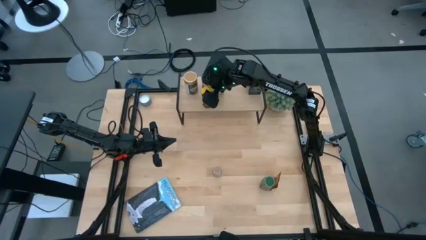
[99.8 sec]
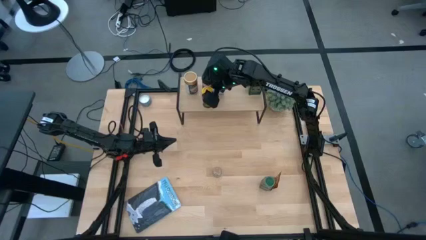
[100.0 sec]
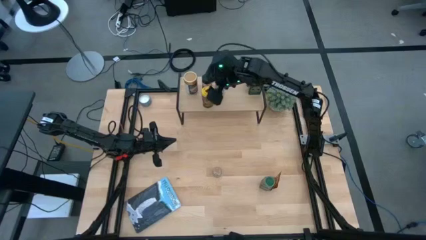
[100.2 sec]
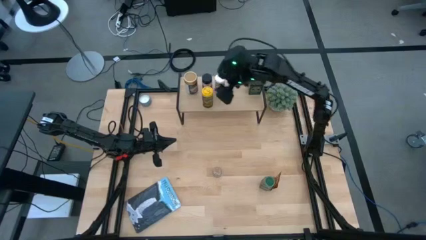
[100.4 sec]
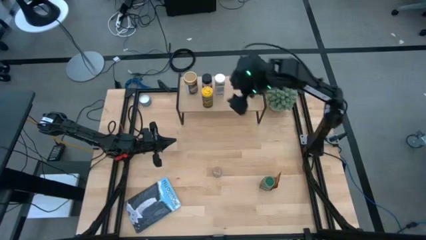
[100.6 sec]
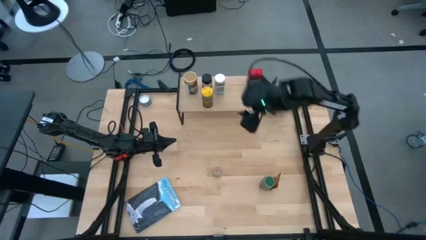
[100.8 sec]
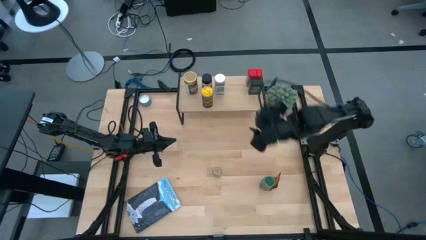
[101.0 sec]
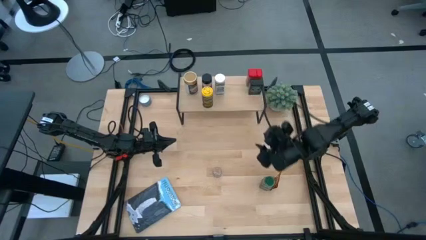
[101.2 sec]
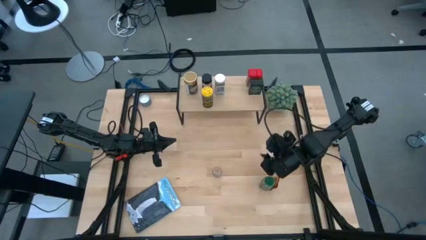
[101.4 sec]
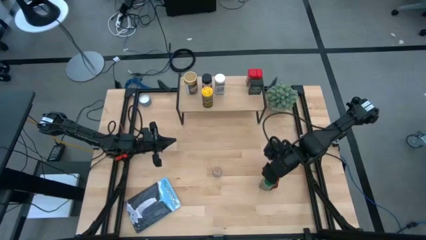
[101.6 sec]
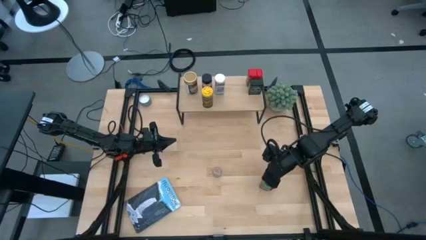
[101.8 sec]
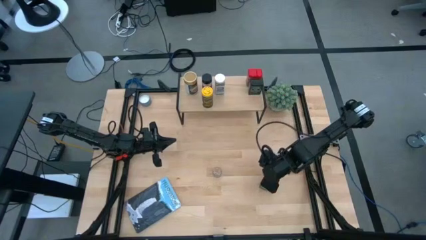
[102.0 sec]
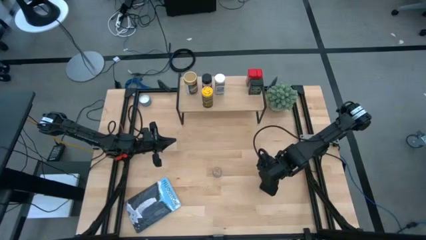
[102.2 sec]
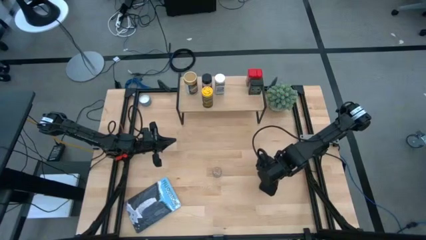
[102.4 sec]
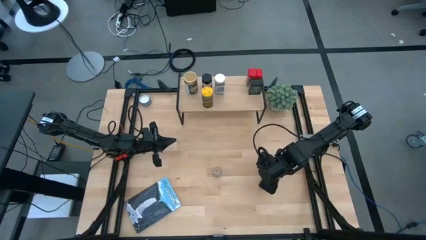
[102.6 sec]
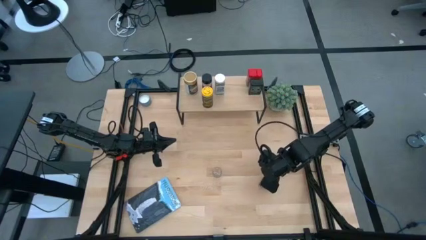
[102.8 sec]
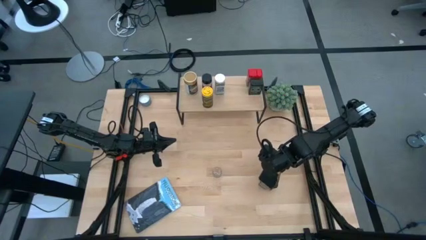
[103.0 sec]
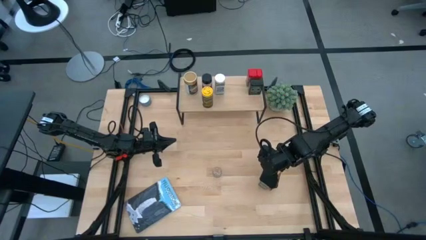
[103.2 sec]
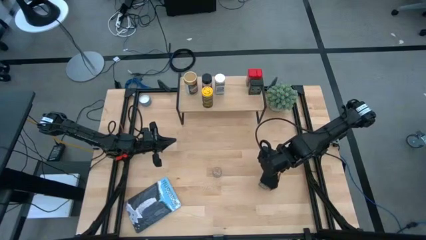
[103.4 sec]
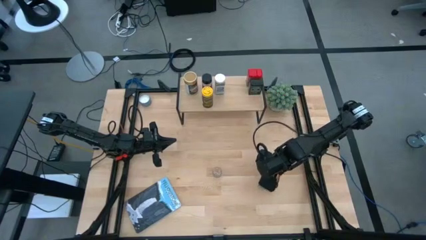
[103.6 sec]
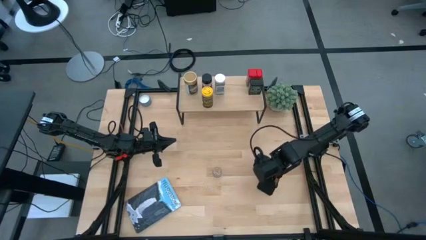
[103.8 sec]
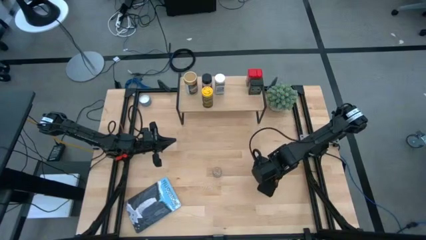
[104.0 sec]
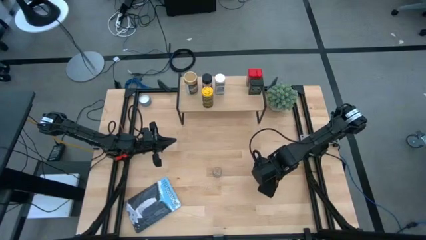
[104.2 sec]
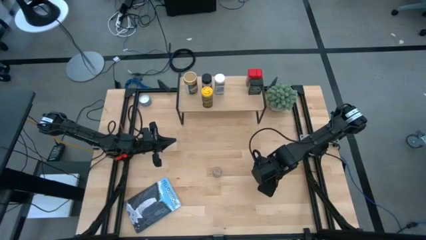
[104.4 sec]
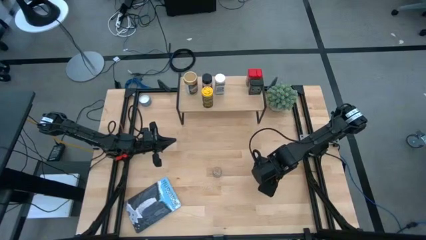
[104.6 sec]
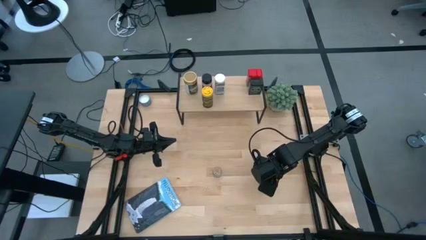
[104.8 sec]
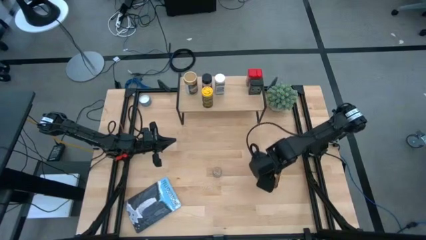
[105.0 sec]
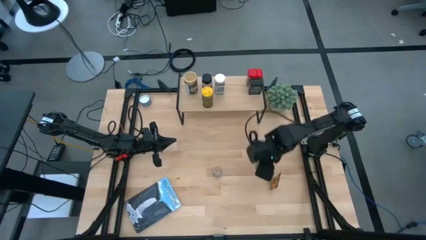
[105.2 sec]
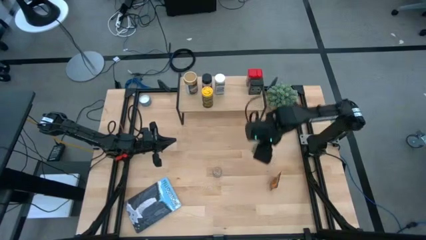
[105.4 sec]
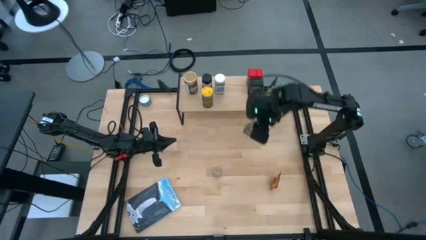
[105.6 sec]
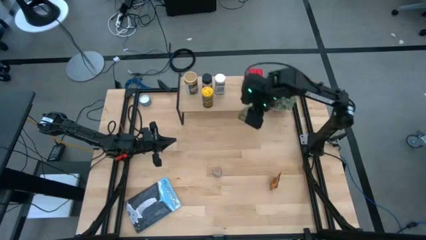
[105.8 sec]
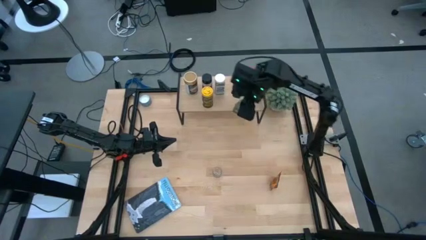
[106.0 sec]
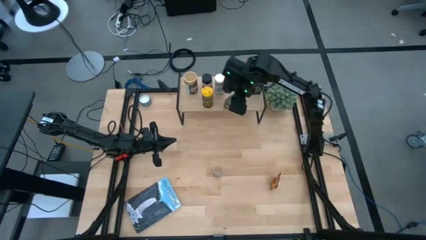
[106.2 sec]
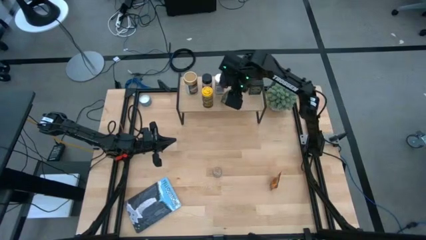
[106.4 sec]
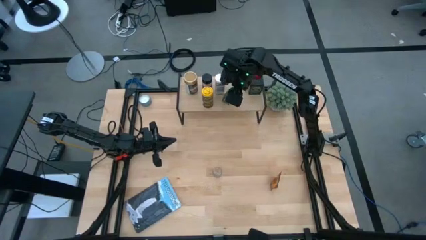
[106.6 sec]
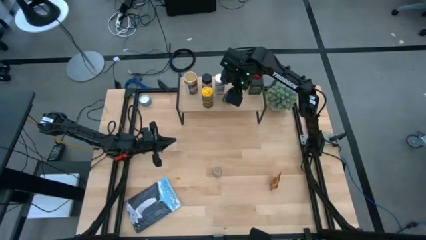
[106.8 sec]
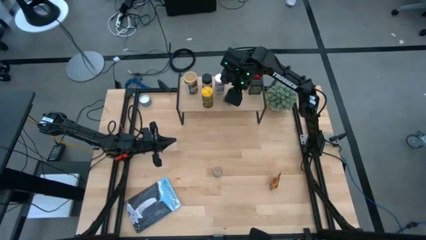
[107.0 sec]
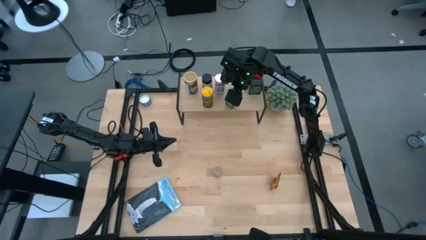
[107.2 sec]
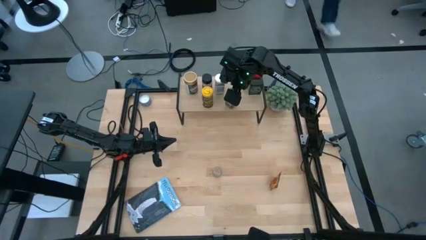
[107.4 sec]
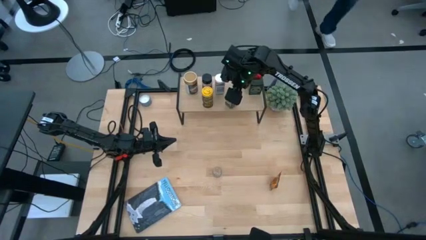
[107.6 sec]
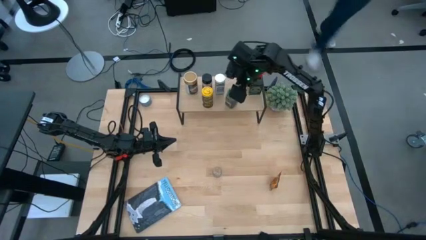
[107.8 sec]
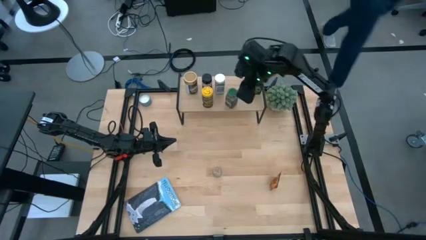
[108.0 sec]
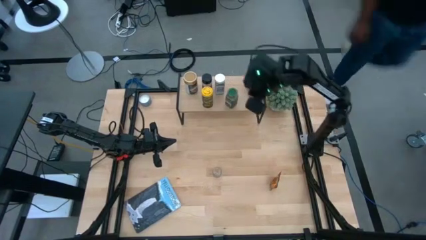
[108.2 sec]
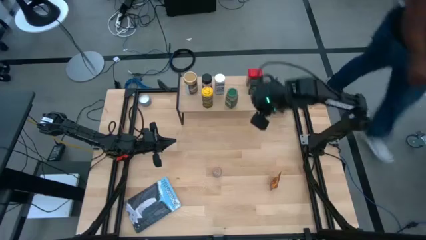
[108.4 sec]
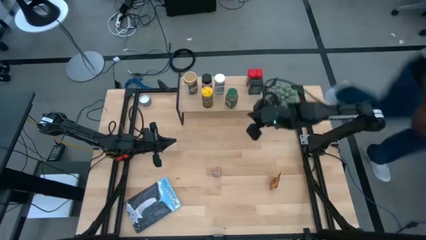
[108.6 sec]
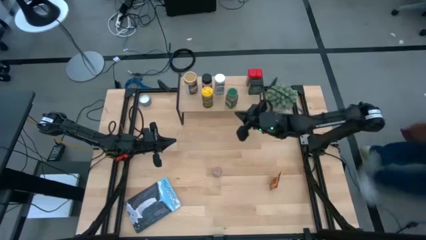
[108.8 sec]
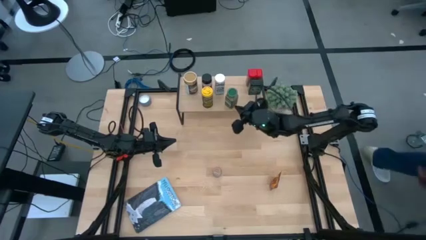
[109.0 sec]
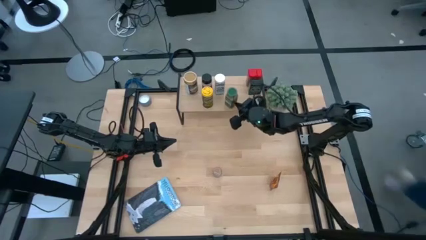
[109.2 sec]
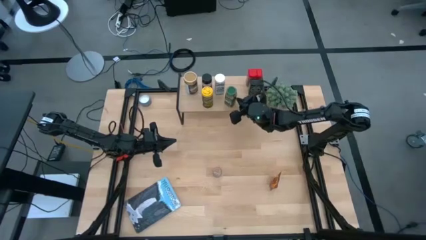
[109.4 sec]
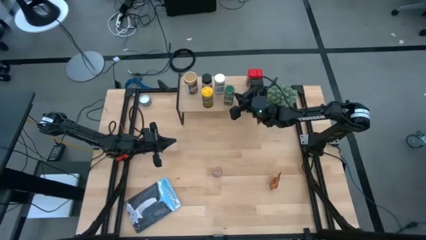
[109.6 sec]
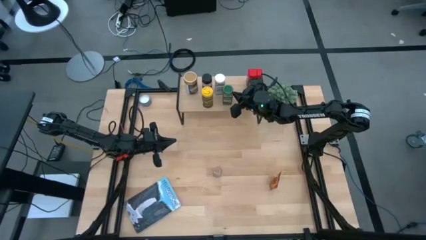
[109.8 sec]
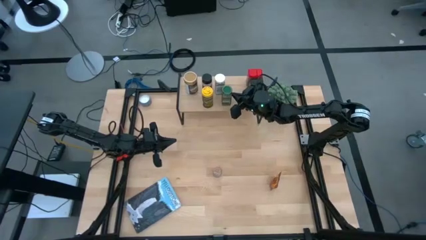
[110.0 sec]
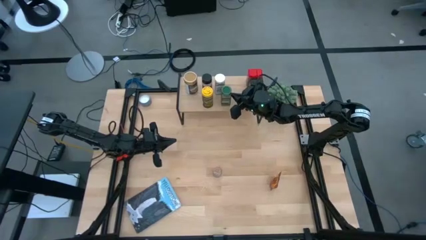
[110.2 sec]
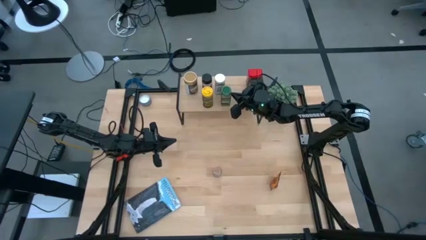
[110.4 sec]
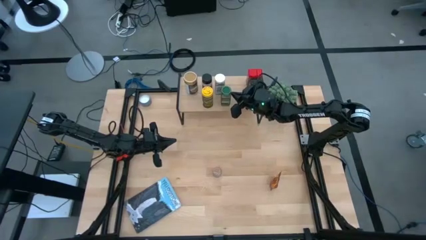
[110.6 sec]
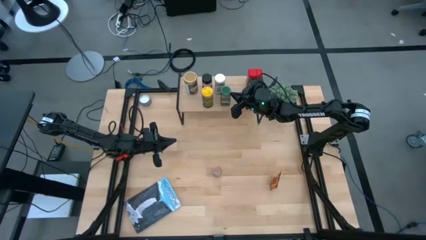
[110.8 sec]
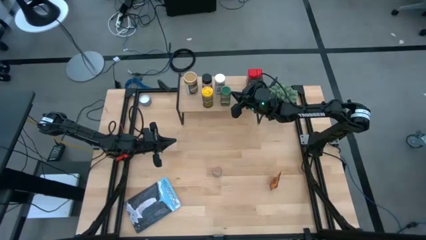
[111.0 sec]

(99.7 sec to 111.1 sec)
Task: Shelf spices
Put the green seasoning bottle on the shelf

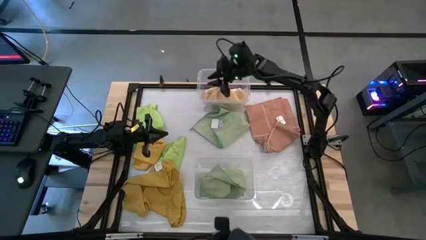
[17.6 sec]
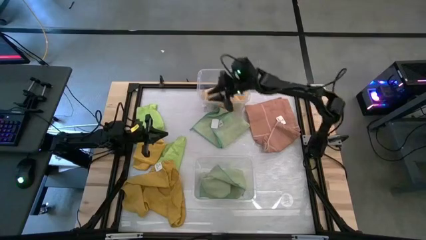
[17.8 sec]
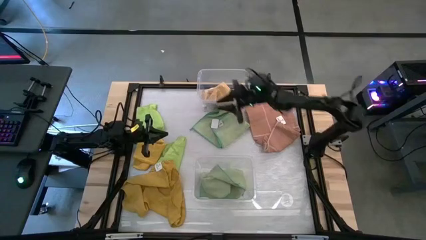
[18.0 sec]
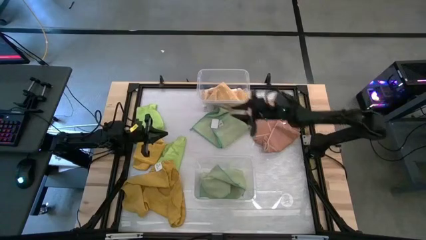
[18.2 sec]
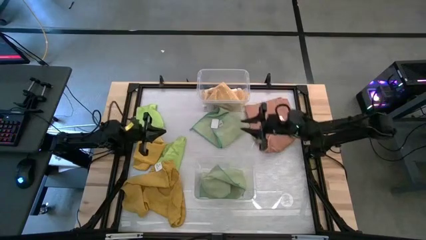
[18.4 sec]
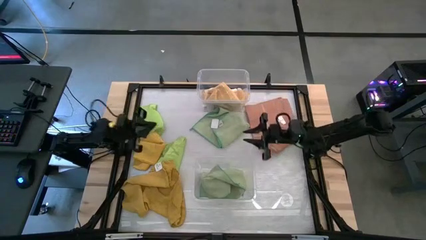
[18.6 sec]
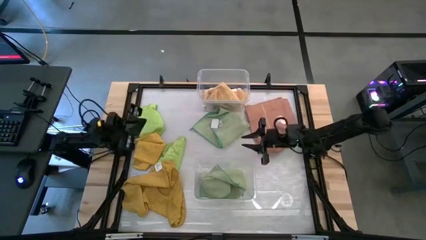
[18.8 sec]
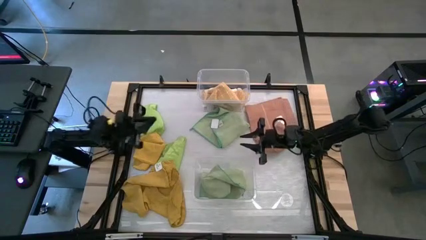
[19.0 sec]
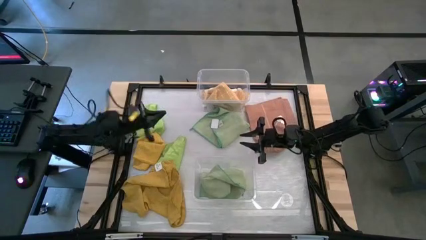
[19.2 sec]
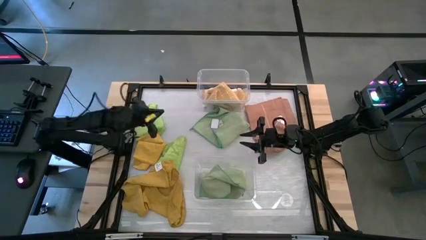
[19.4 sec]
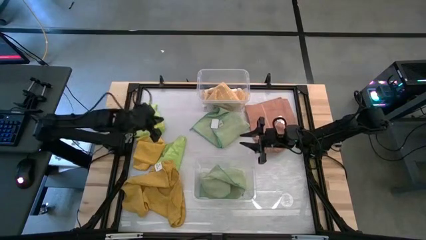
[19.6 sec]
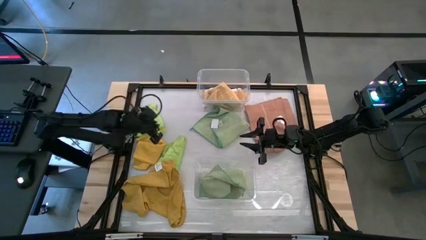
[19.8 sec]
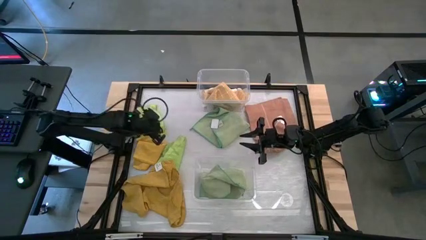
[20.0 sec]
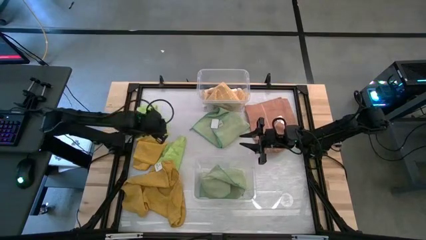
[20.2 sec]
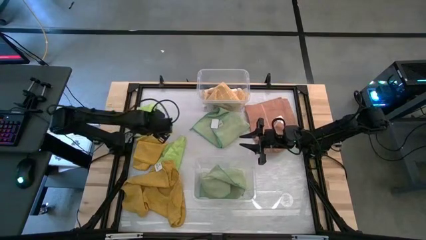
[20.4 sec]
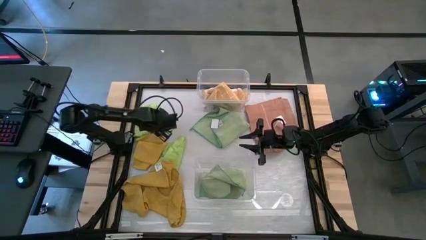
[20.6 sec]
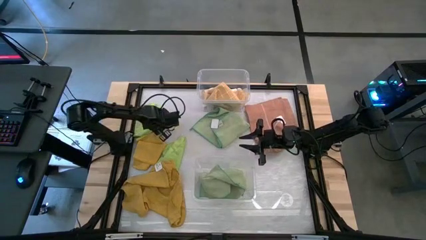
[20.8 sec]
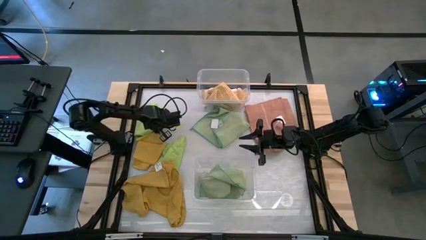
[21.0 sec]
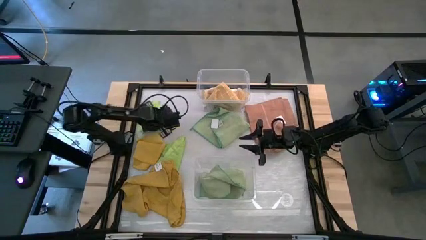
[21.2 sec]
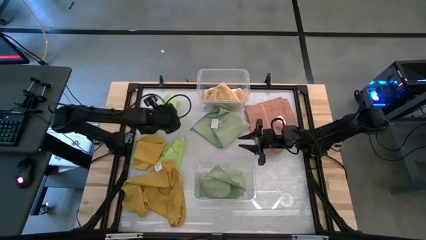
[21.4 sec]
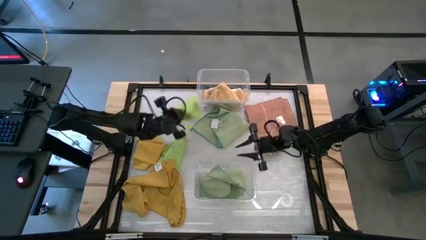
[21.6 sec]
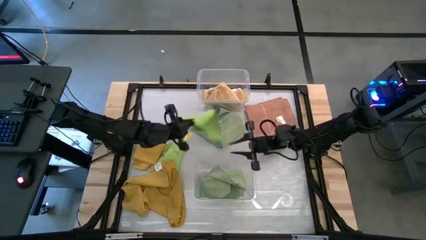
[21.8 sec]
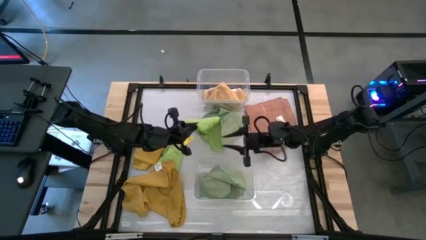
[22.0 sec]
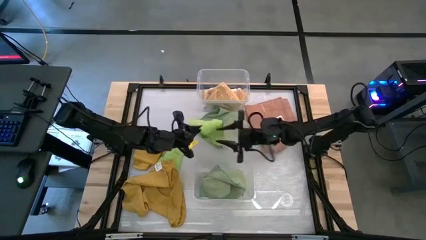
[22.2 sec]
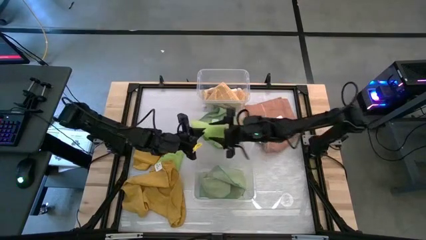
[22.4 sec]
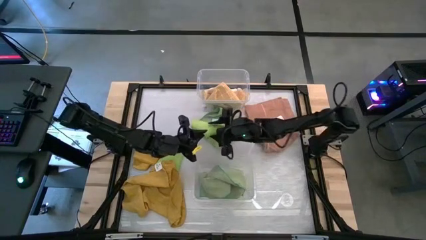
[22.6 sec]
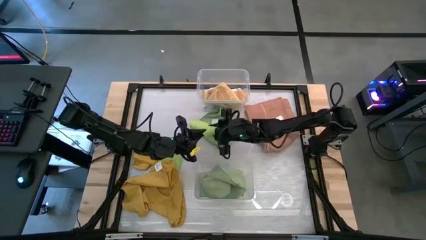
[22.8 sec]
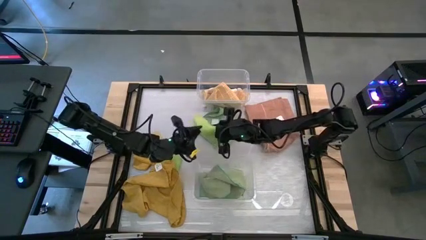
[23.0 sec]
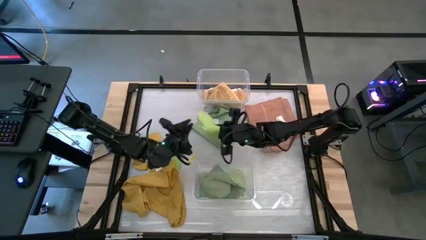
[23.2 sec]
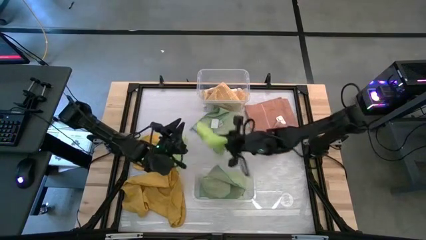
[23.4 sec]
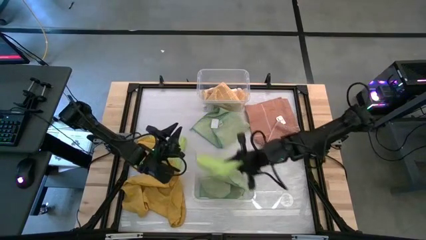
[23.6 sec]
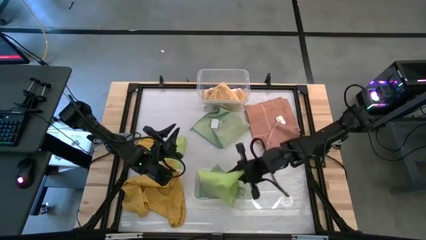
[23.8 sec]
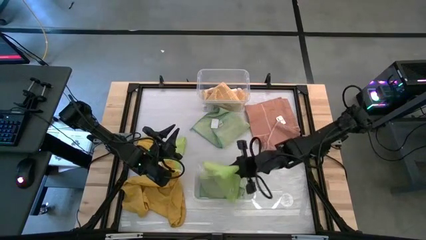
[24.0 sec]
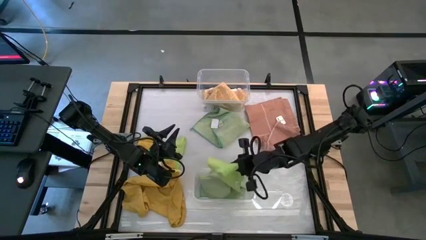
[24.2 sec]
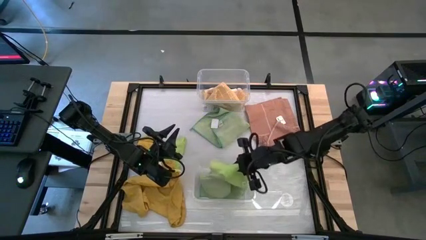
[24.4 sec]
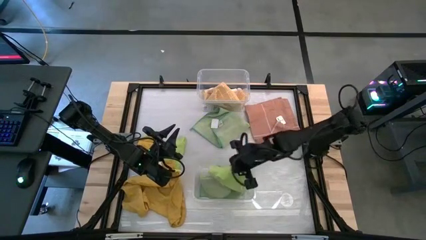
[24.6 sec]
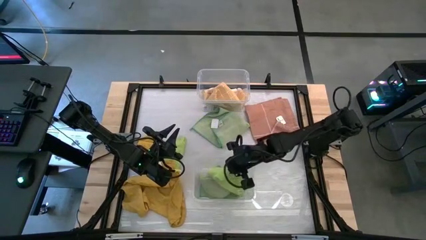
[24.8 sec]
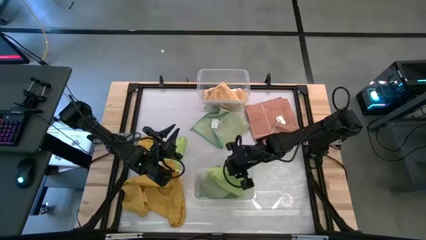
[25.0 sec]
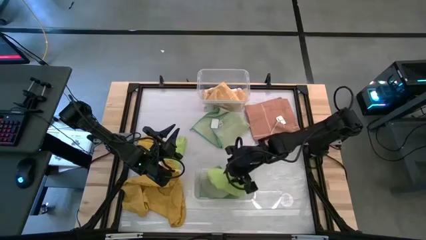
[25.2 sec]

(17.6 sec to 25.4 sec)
Task: Sort towels by color in basket
Put the top light green towel into the bottom transparent bin
